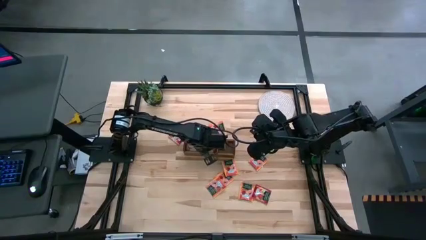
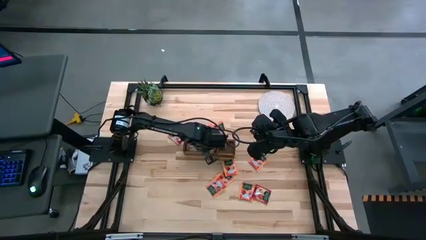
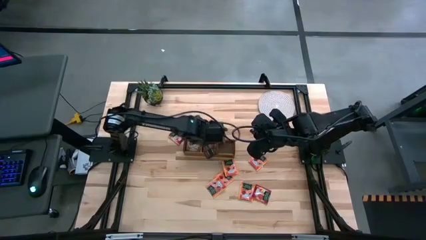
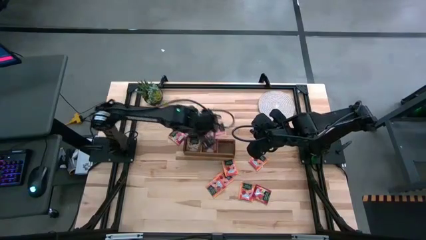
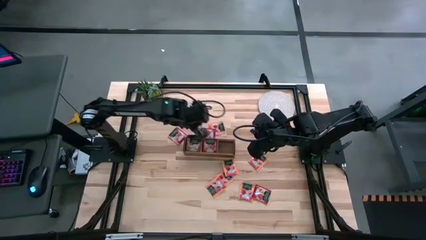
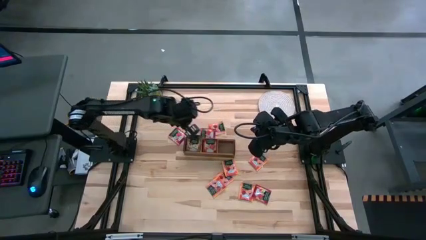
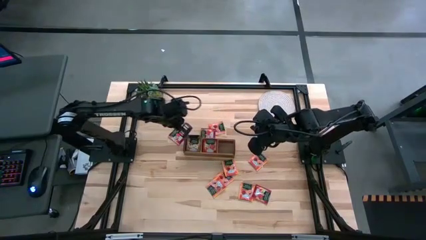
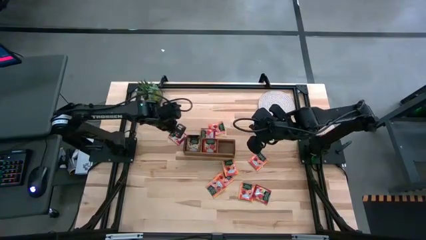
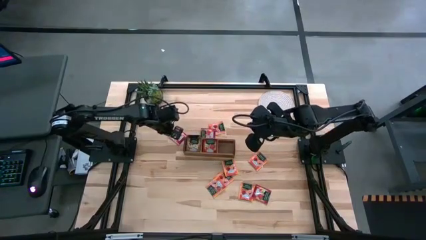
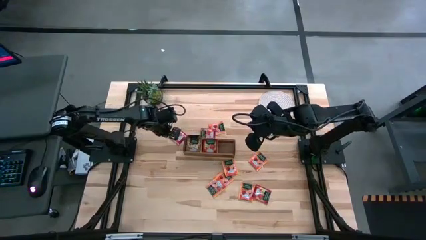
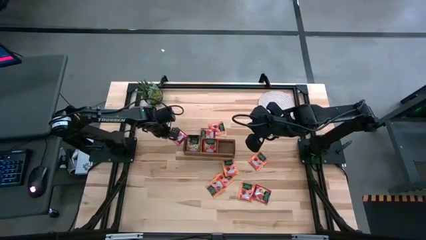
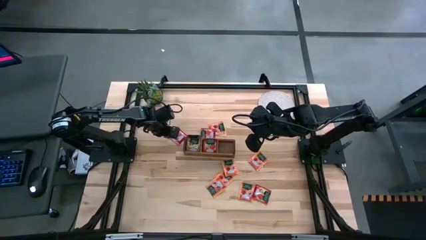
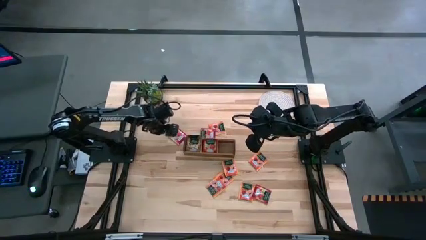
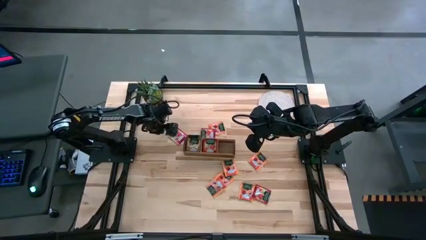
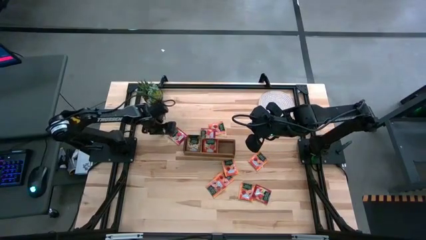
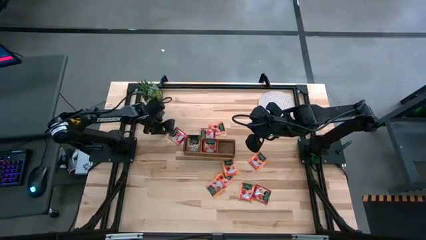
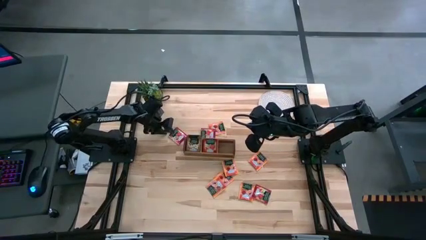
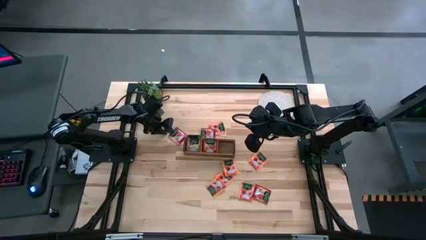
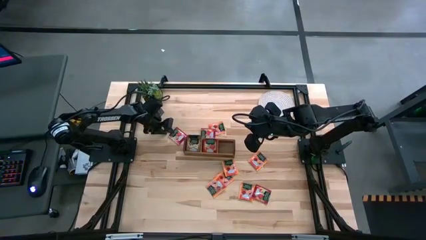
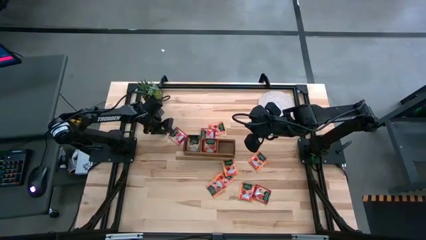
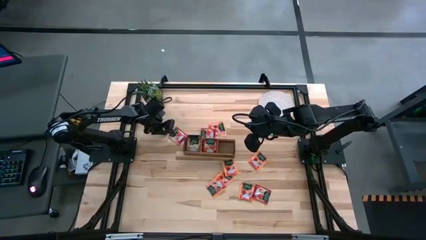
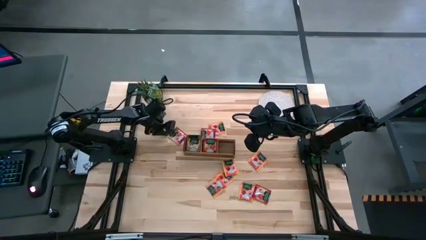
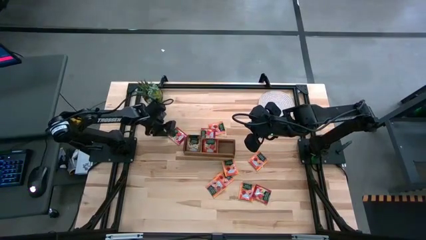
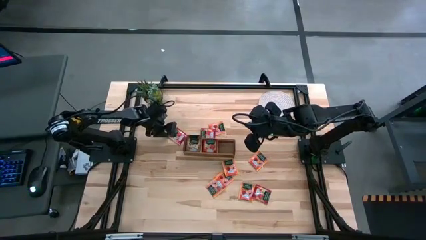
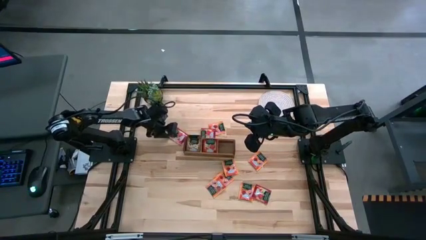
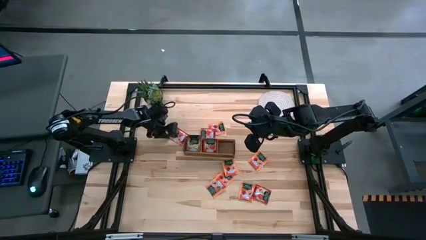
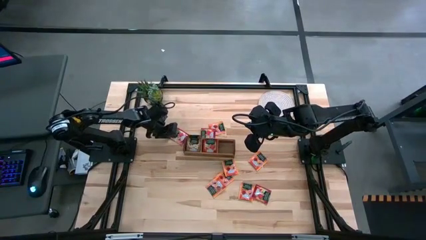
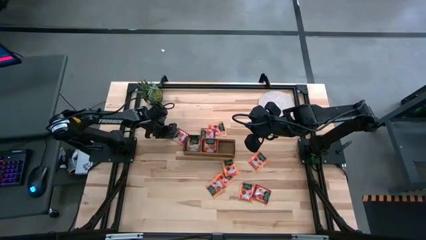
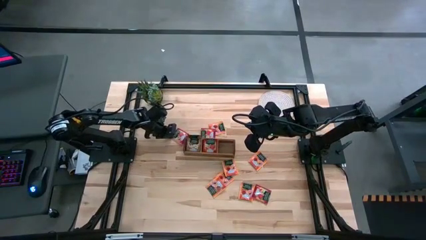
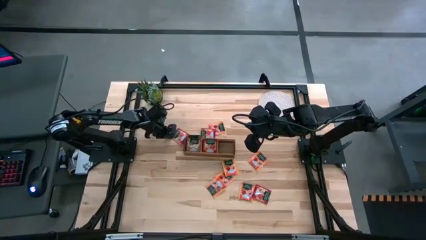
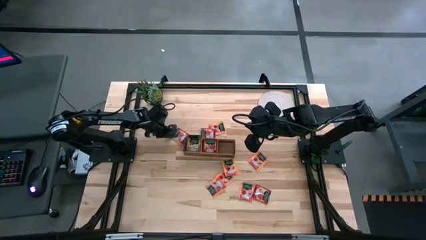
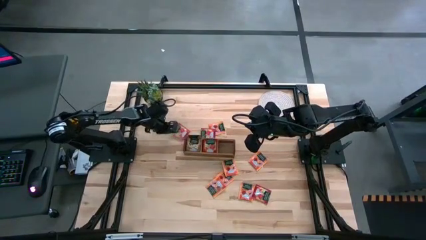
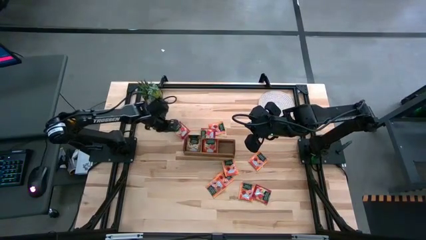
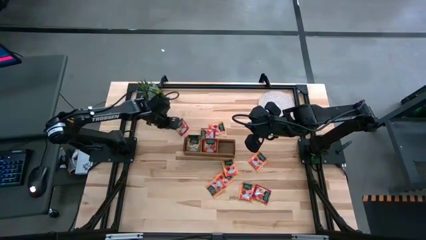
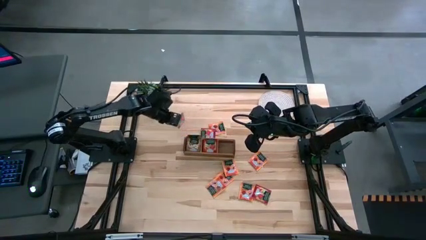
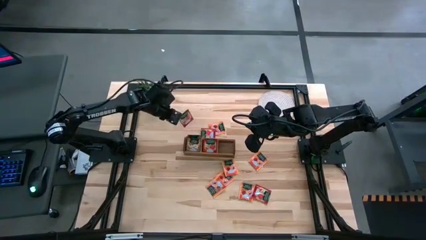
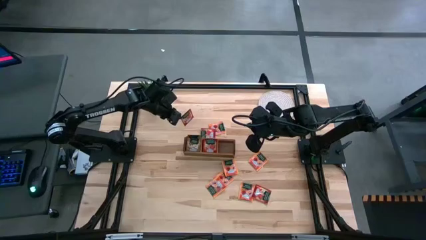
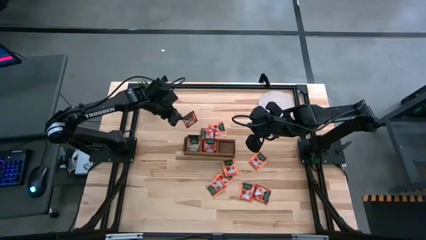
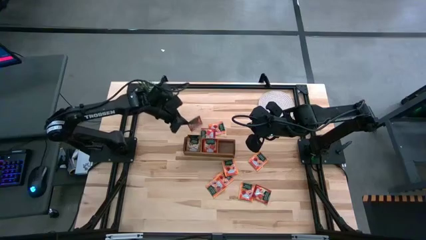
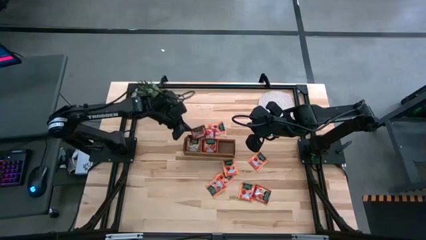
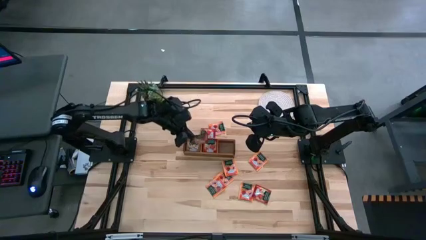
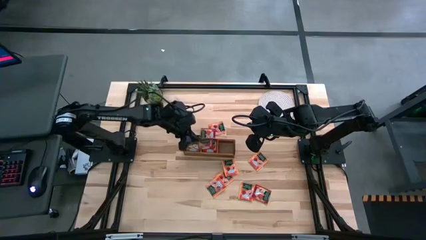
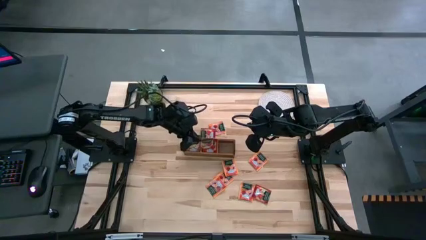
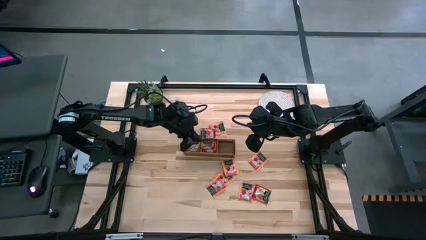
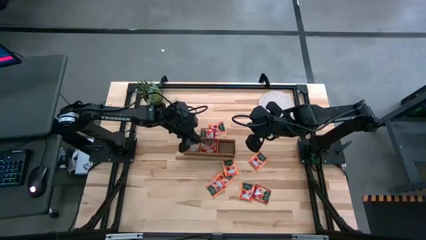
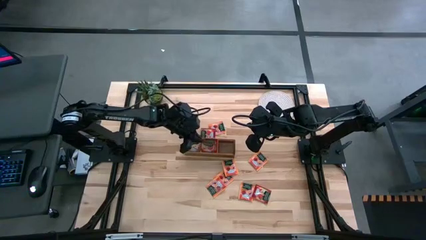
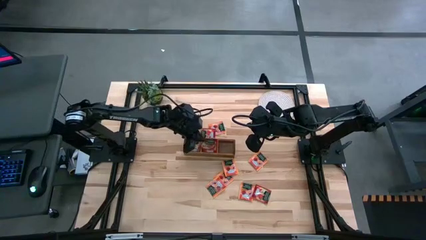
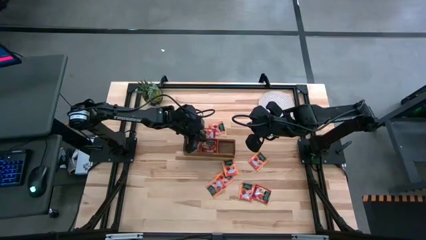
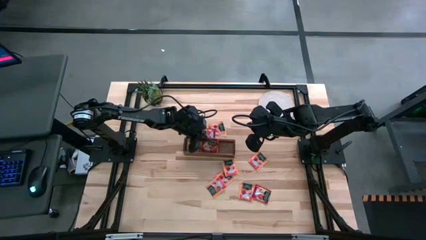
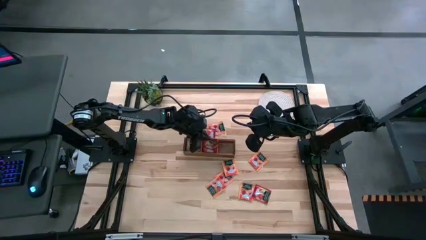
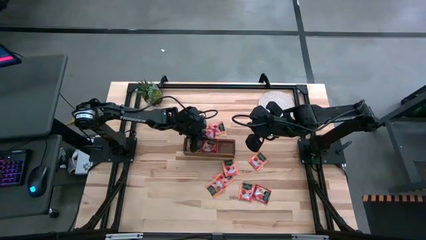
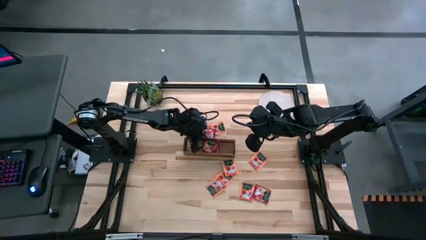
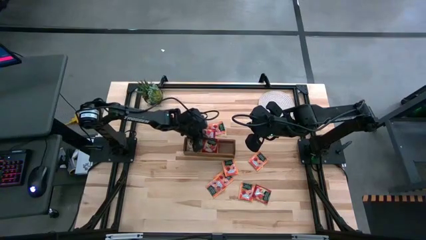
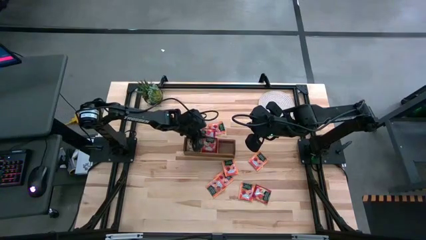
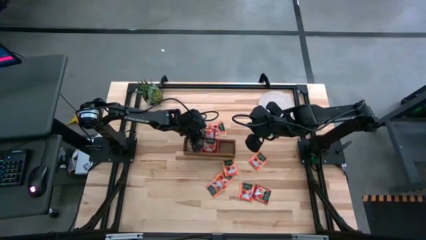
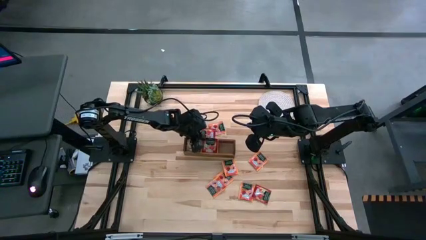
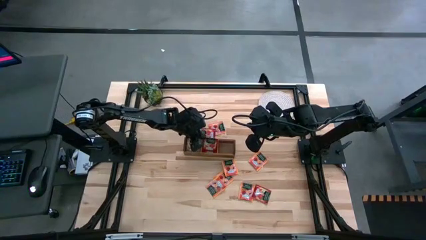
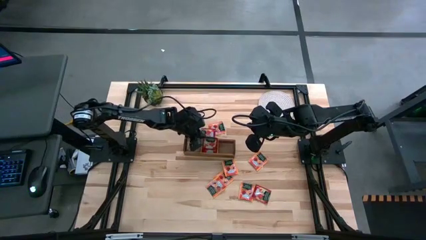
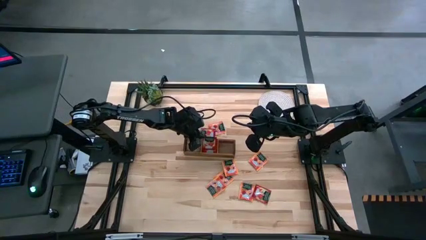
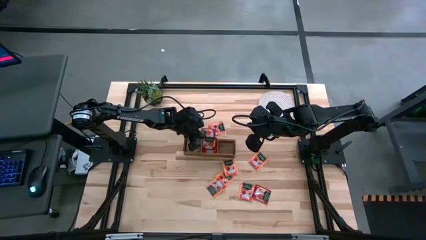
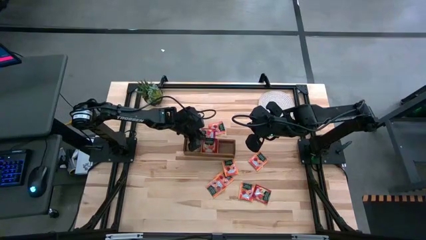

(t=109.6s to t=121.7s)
Task: Pick & Place Tea
Put the red tea bag into the middle section of the brown wooden organizer
